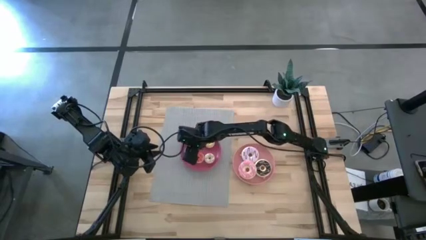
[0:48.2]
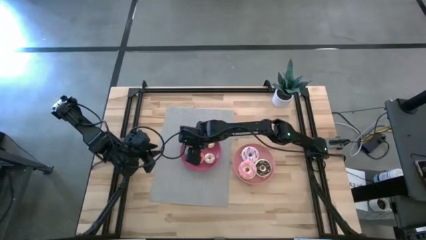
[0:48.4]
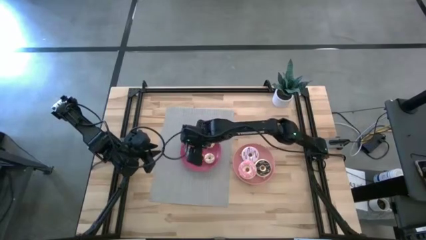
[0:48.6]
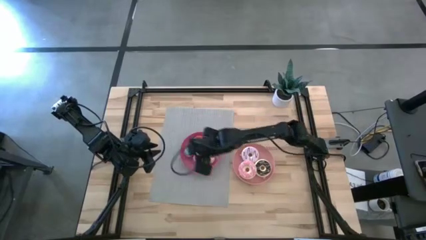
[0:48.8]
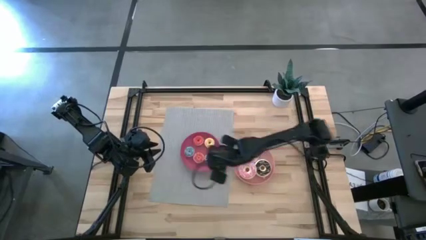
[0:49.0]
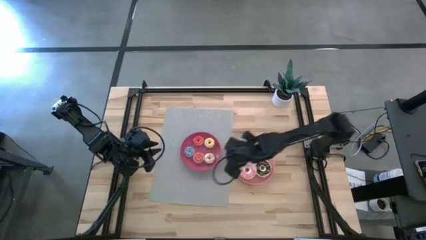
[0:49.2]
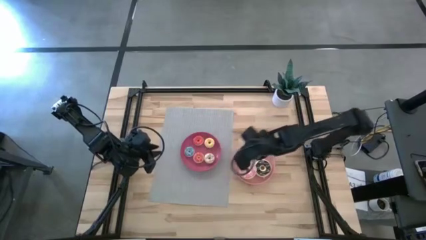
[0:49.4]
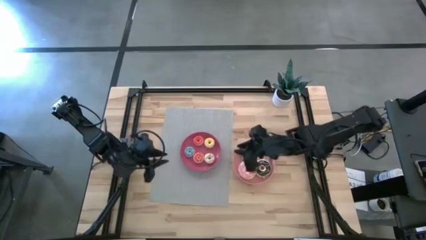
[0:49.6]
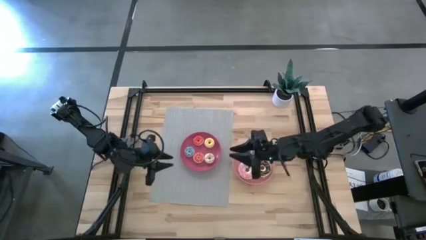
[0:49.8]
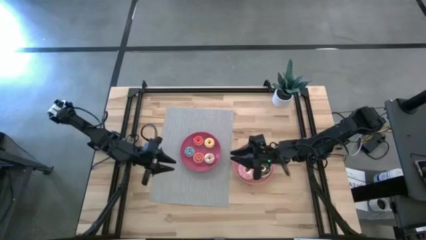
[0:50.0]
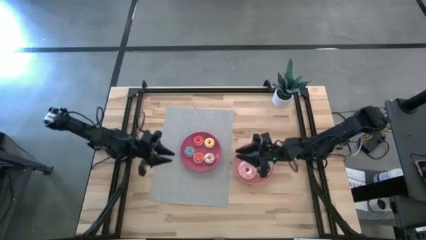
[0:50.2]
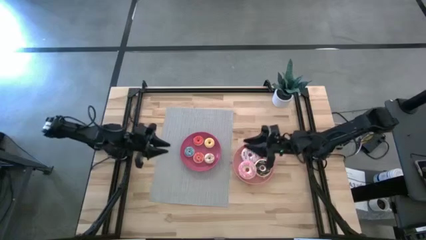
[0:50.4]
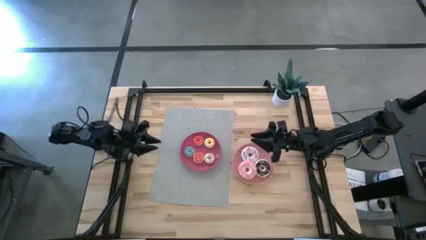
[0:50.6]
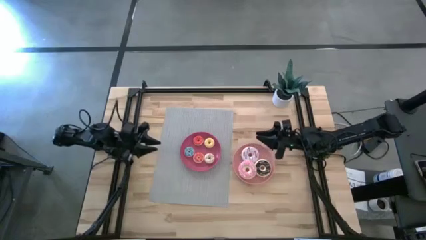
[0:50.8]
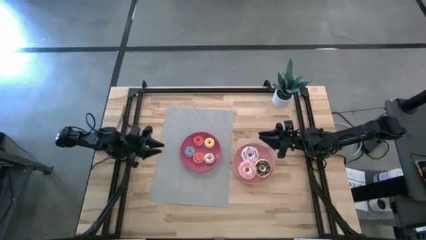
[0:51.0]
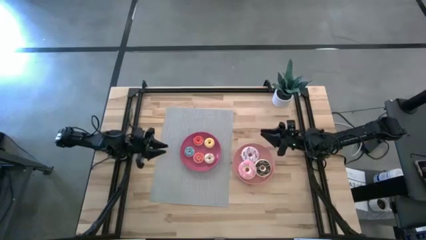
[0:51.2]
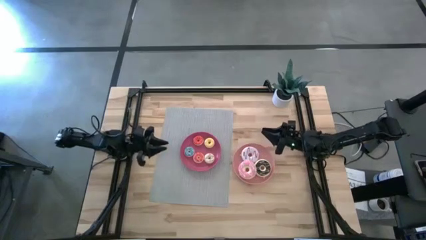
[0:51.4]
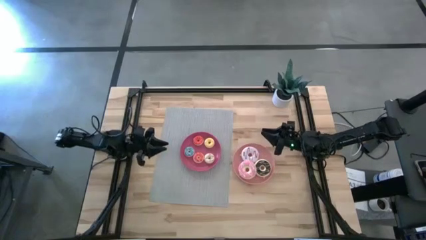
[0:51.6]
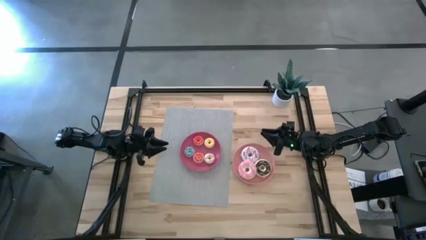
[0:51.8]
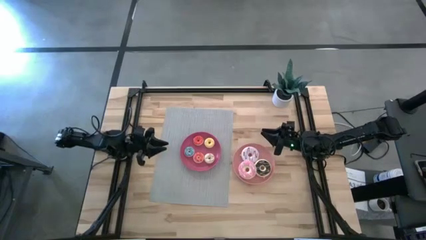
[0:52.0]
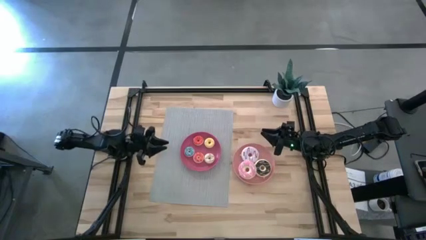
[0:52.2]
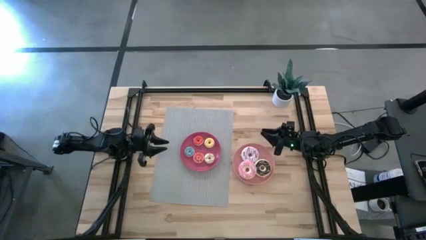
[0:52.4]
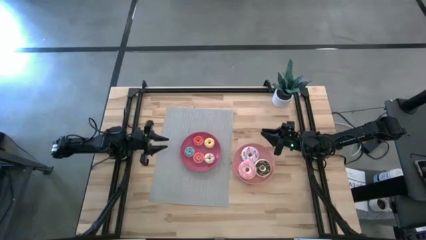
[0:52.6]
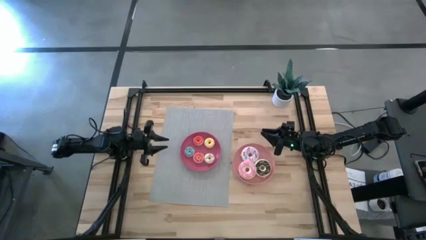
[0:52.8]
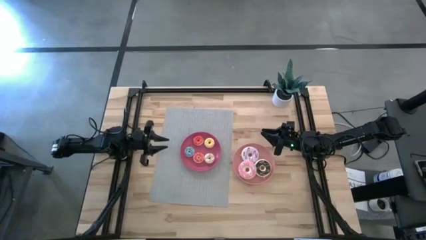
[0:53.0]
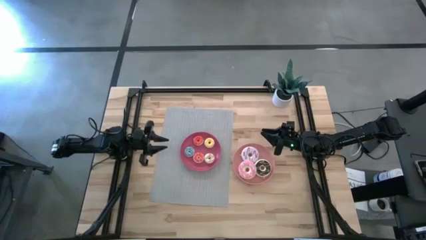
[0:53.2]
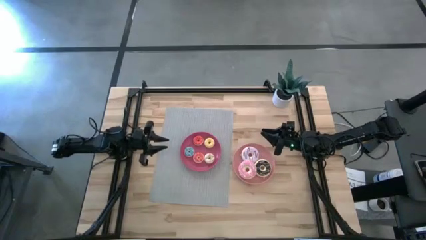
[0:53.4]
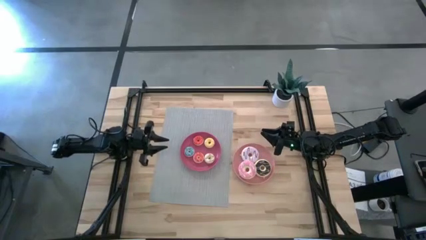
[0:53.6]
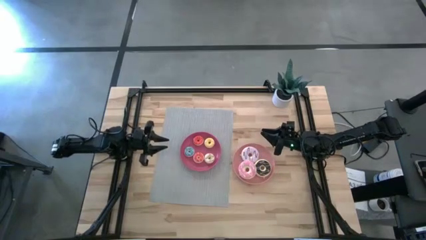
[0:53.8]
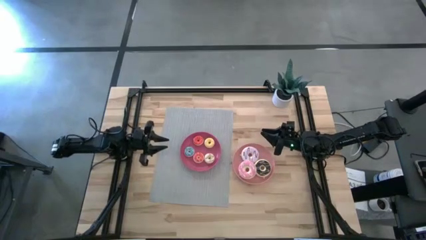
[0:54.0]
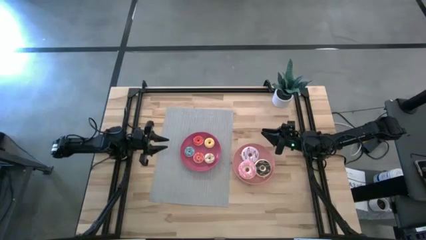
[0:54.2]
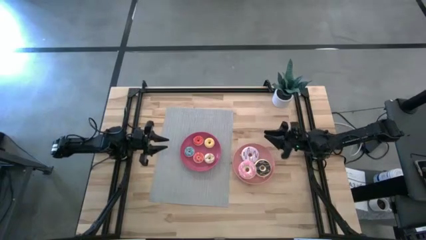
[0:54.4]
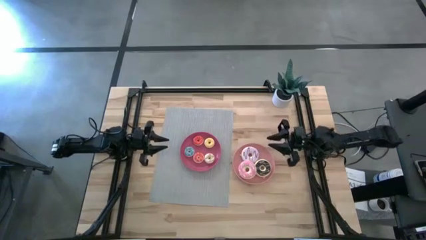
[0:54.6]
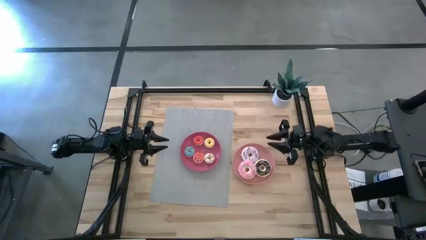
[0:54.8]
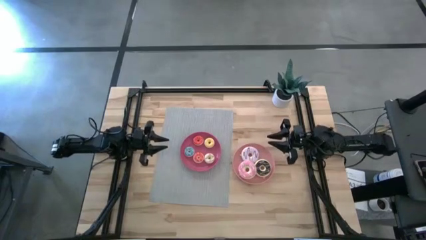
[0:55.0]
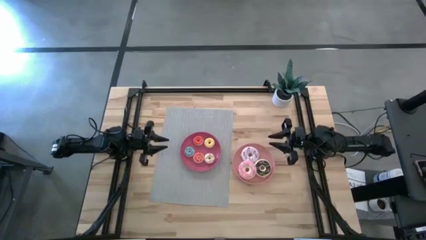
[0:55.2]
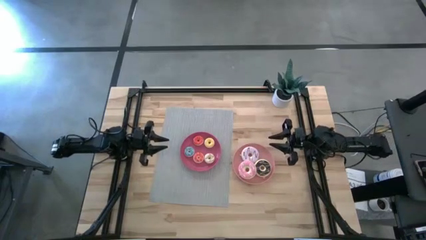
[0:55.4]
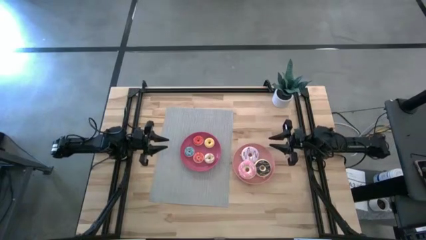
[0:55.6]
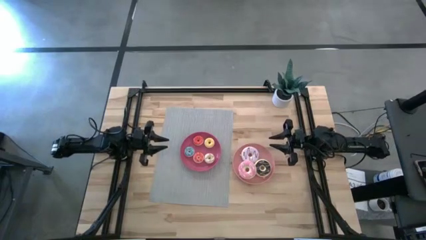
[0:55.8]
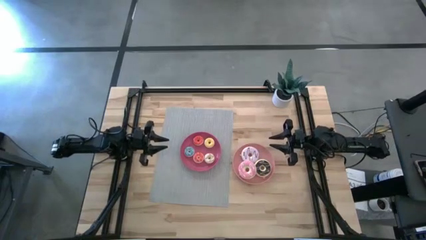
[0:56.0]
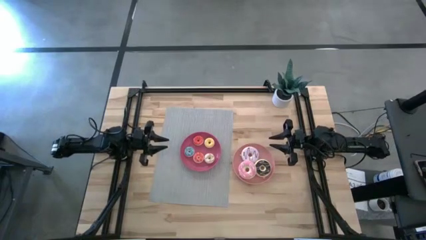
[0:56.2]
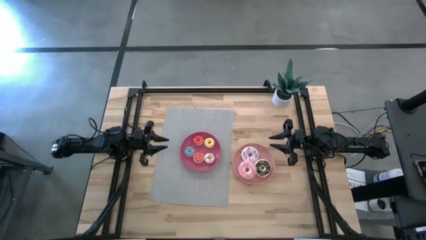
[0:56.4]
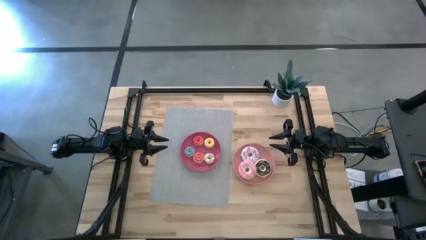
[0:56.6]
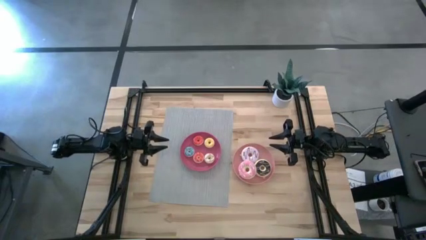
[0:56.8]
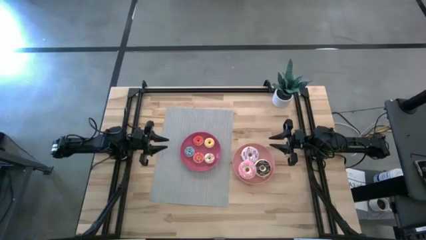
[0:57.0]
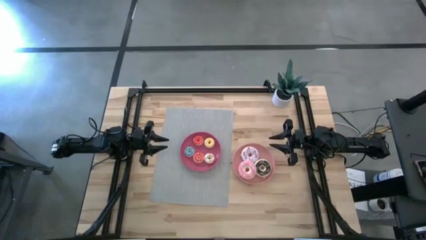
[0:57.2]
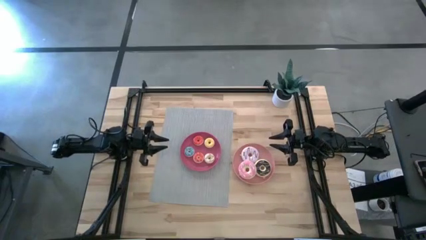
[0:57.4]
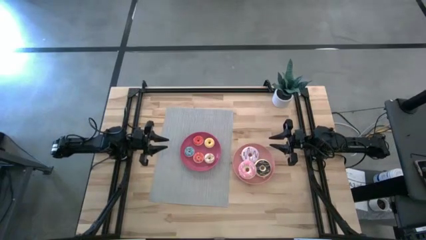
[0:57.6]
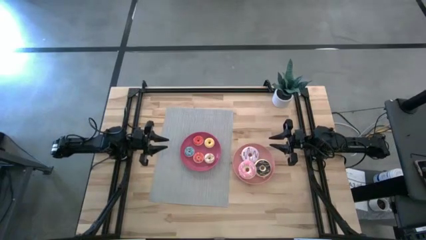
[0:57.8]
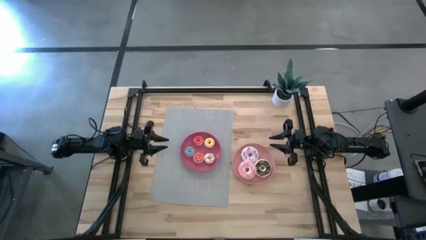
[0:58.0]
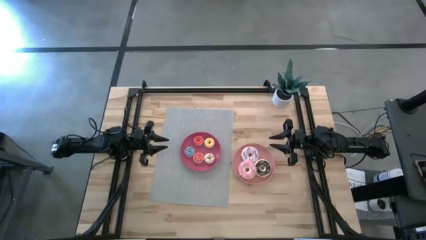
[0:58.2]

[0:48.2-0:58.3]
Task: Pick & Place donuts
Return to Home Position
